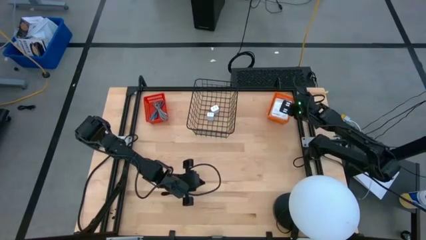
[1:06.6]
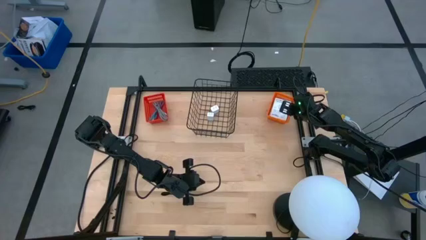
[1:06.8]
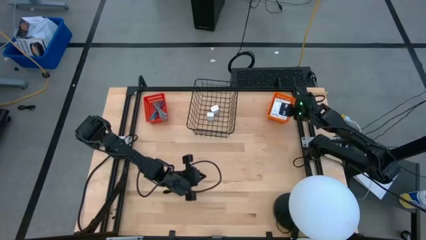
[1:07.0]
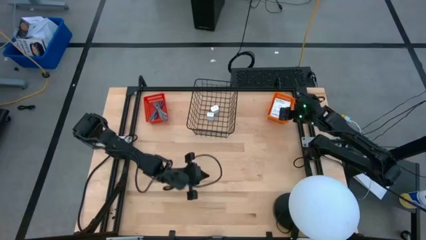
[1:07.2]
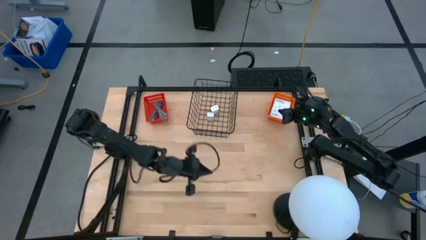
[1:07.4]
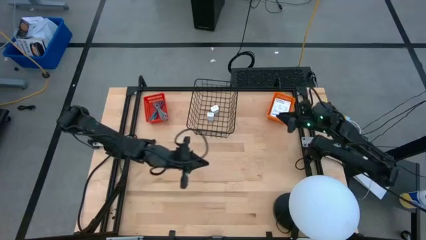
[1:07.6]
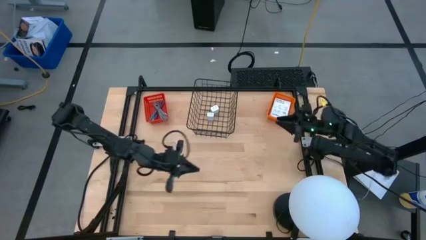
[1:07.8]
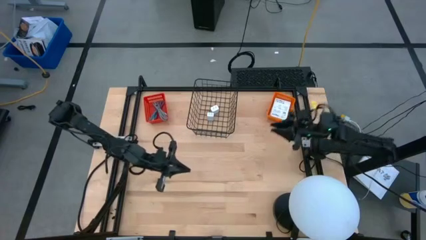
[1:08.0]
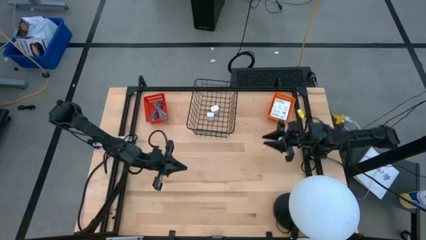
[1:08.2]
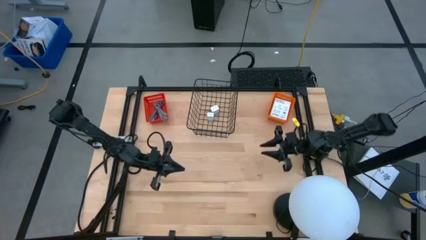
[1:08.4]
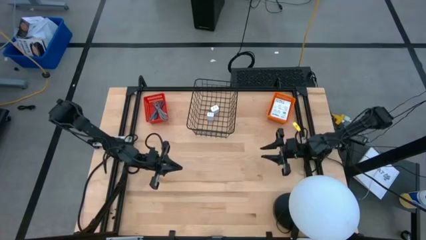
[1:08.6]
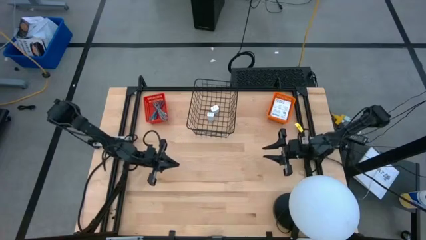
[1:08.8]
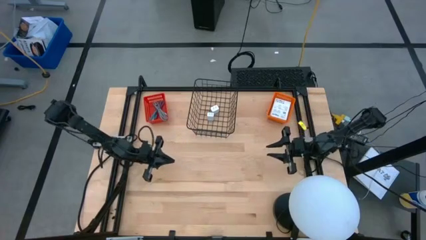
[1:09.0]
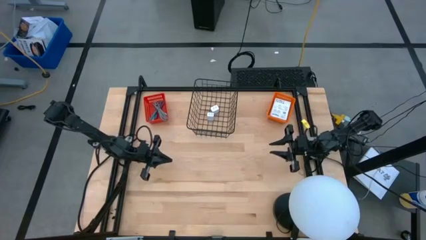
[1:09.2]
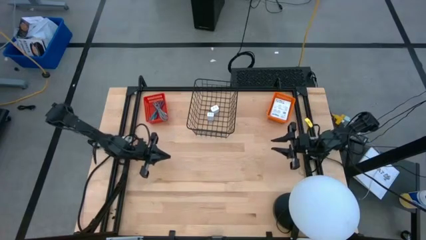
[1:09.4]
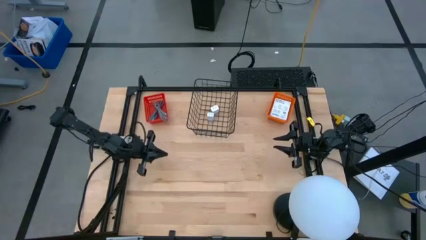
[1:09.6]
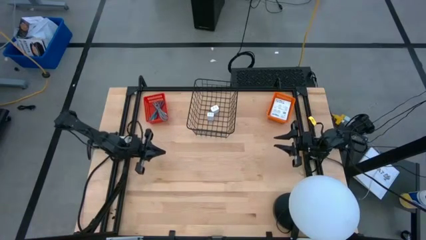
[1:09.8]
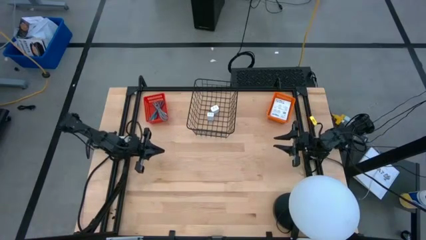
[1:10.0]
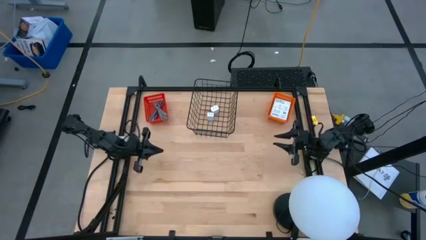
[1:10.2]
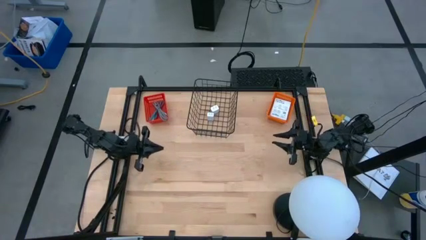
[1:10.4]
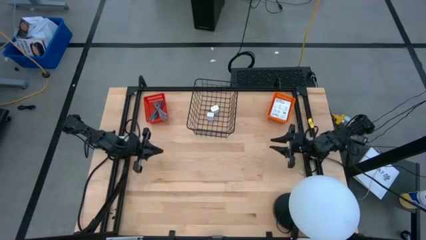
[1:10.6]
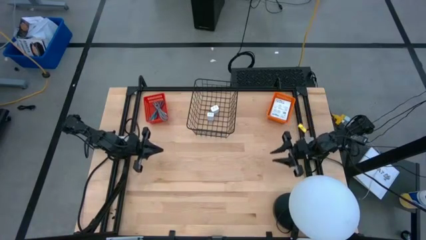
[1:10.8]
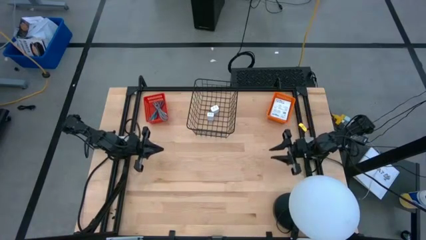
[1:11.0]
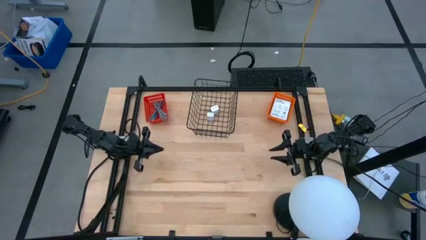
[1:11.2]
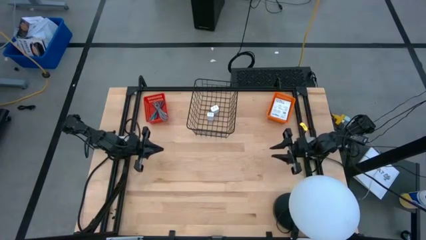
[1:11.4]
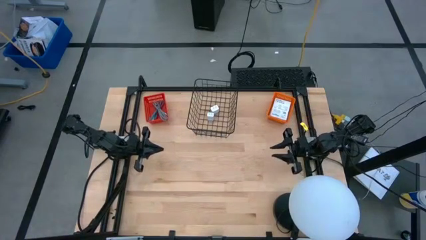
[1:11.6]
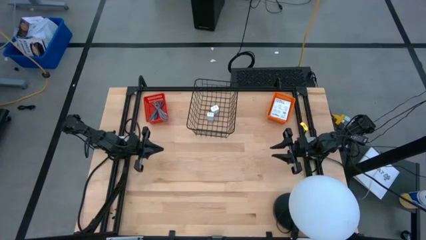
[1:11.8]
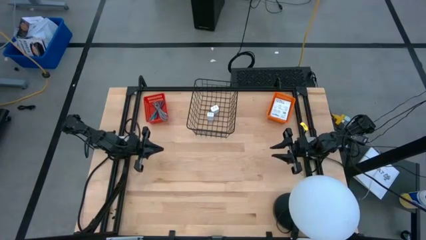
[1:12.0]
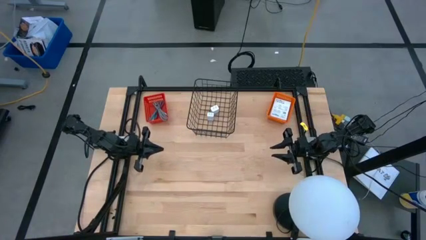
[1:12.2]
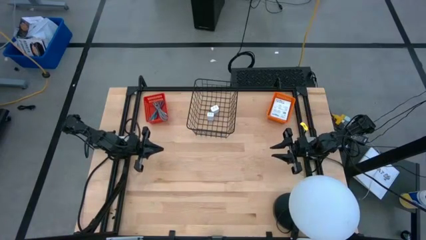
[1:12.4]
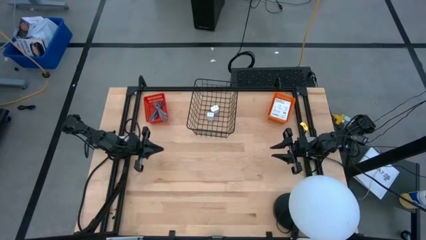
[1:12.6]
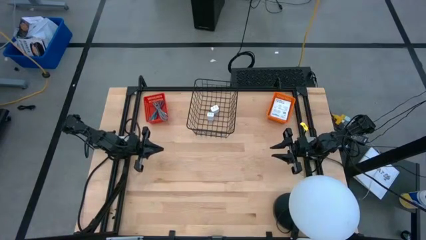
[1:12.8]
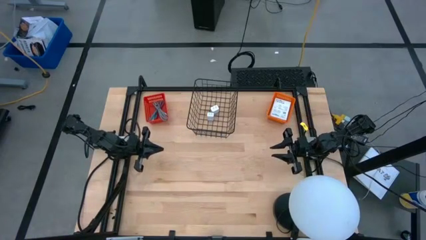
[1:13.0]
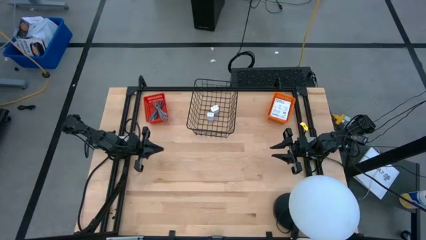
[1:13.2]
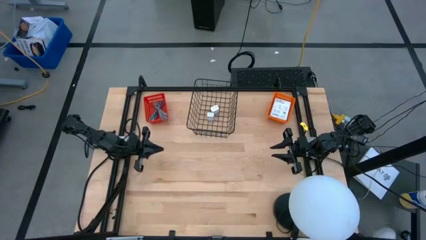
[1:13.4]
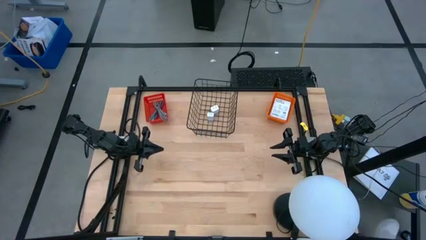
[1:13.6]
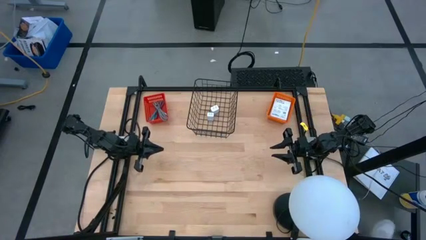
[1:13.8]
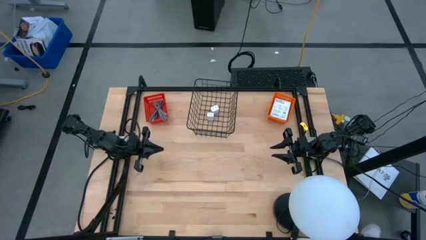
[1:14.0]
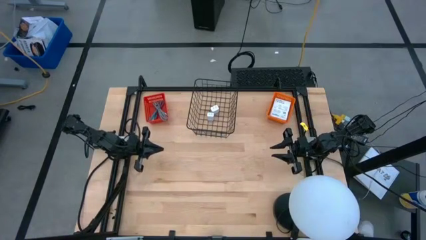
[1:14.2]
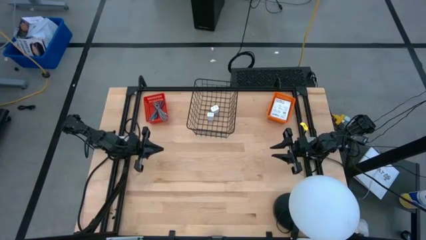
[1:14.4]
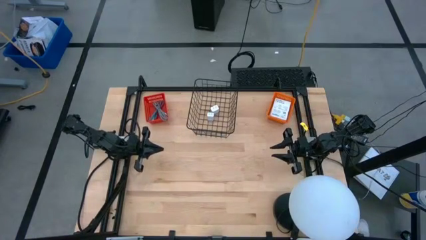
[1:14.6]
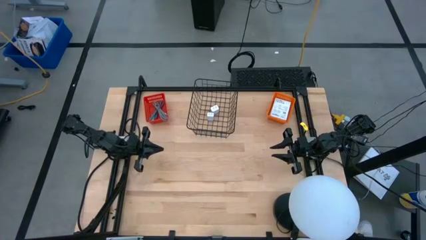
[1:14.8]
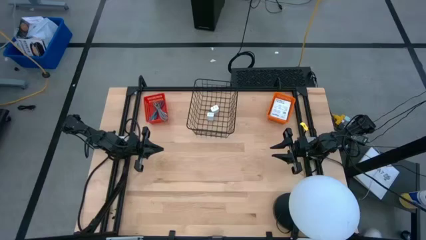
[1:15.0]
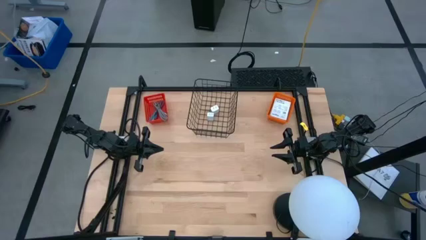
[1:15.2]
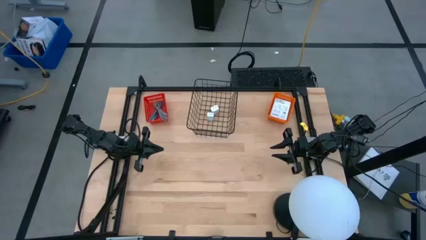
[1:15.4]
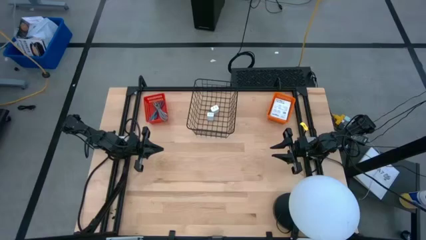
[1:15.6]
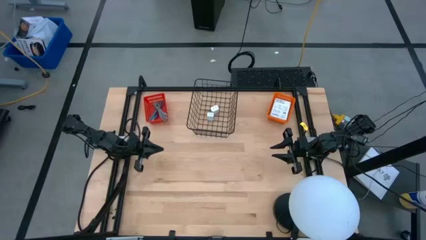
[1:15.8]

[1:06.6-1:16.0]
Task: Pick and place items into bin
Return to Home Position

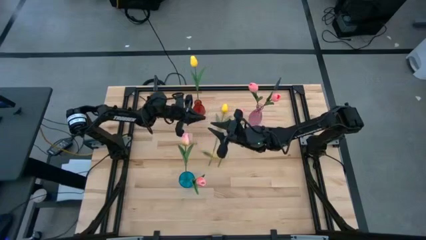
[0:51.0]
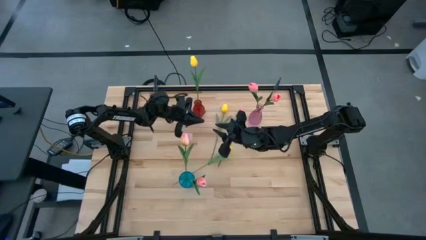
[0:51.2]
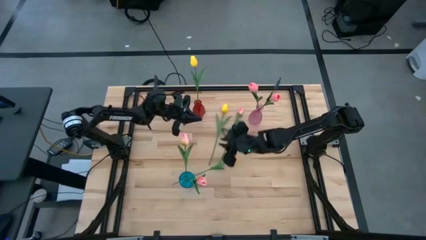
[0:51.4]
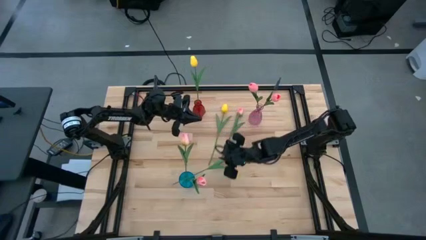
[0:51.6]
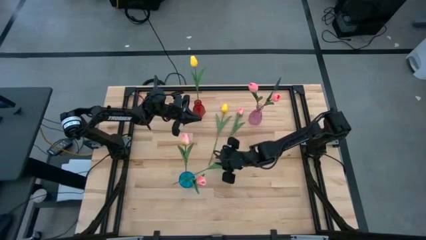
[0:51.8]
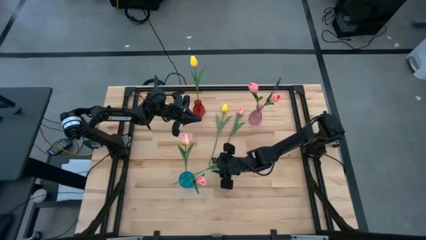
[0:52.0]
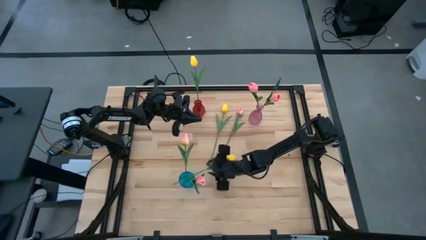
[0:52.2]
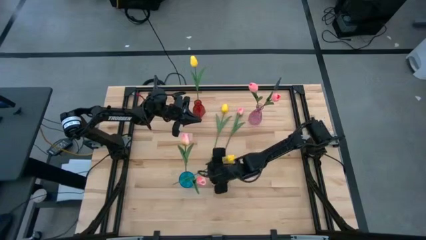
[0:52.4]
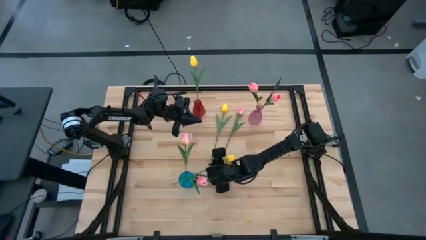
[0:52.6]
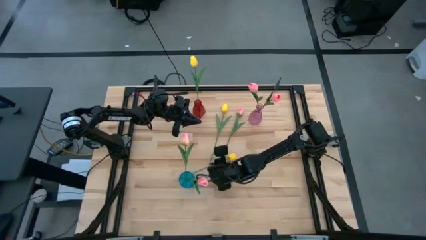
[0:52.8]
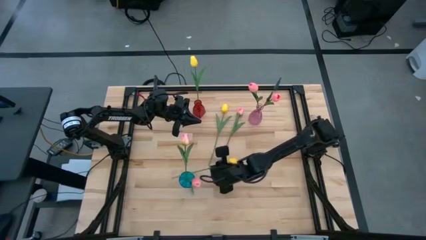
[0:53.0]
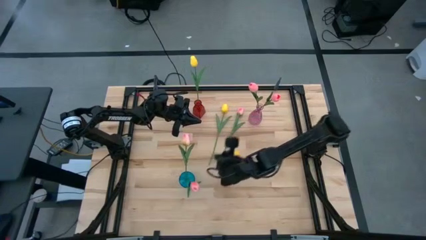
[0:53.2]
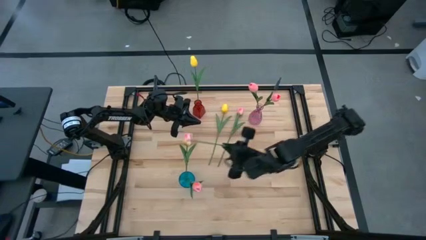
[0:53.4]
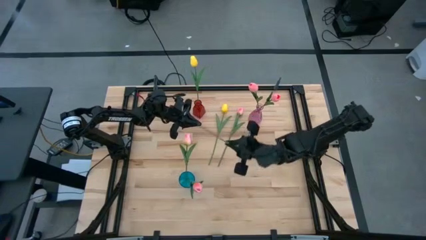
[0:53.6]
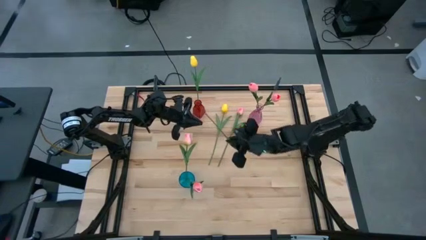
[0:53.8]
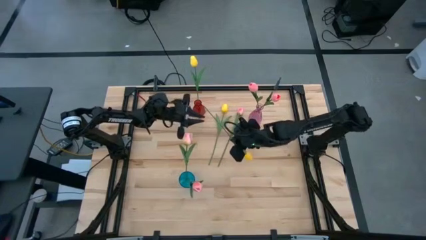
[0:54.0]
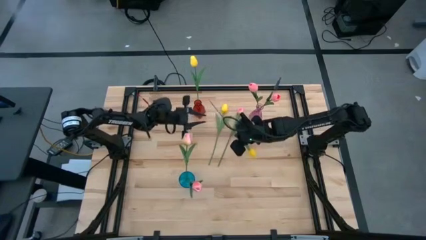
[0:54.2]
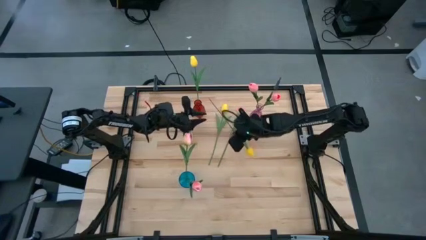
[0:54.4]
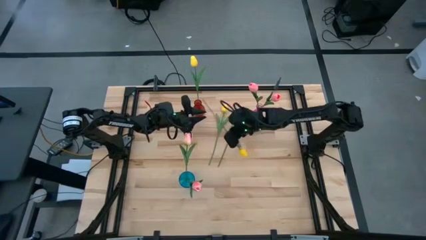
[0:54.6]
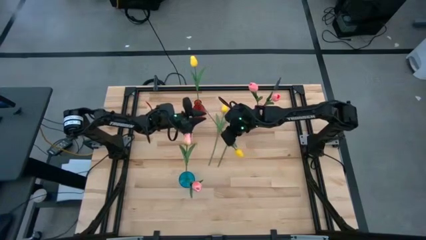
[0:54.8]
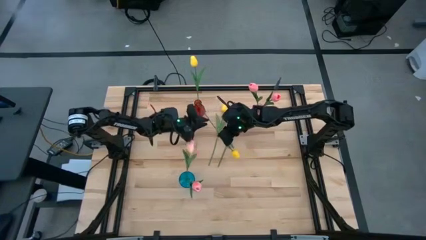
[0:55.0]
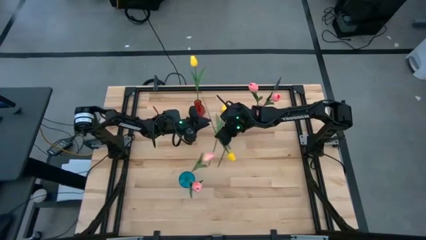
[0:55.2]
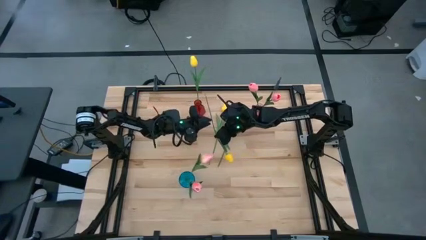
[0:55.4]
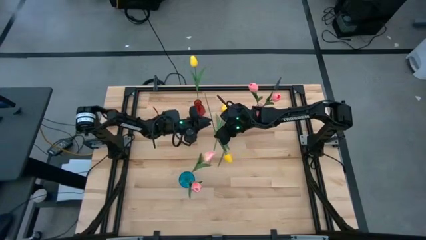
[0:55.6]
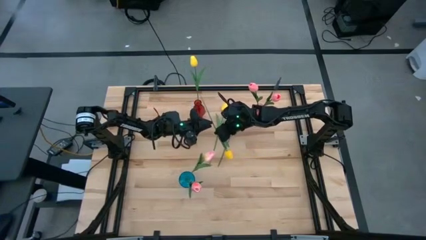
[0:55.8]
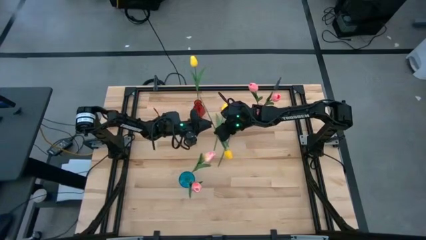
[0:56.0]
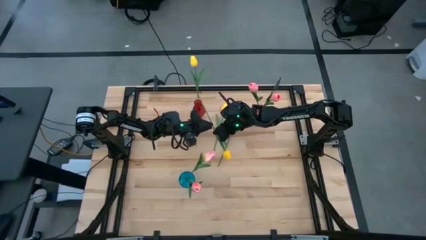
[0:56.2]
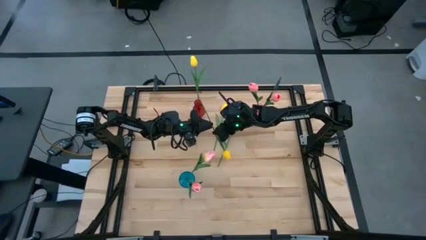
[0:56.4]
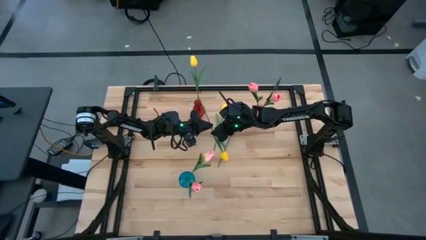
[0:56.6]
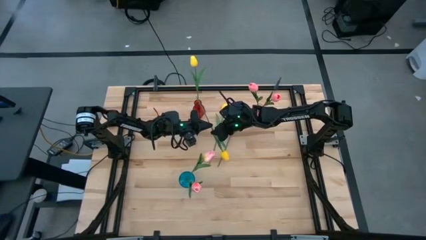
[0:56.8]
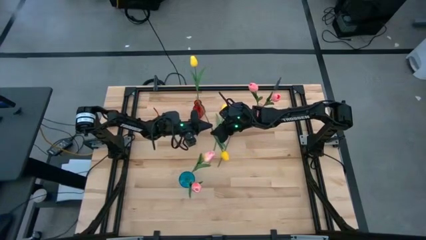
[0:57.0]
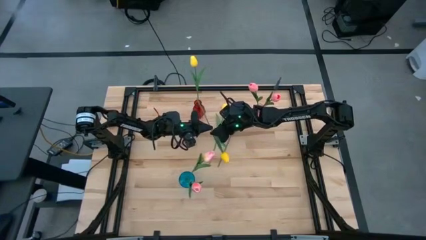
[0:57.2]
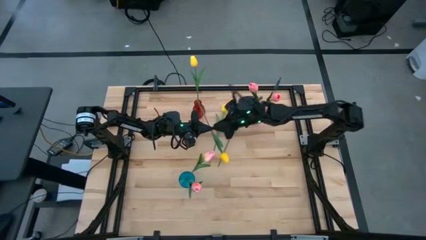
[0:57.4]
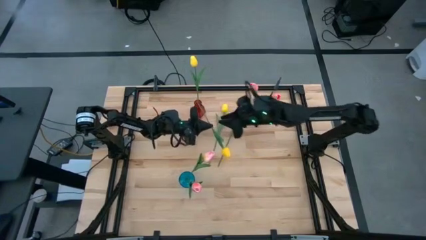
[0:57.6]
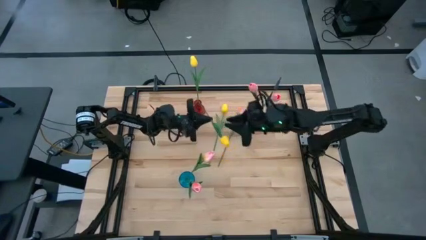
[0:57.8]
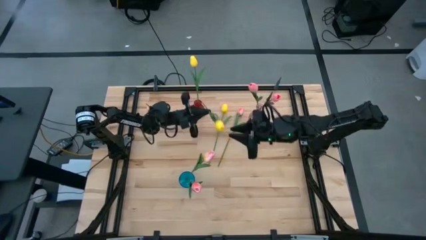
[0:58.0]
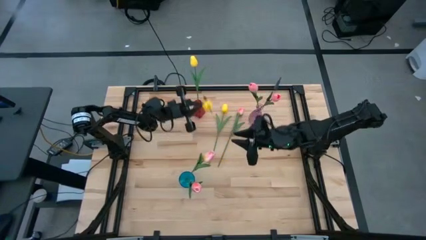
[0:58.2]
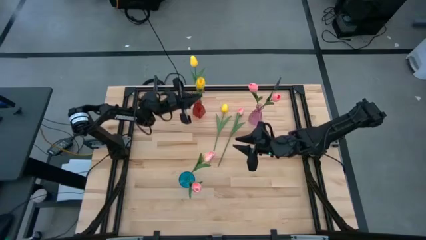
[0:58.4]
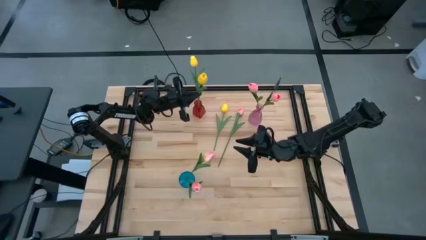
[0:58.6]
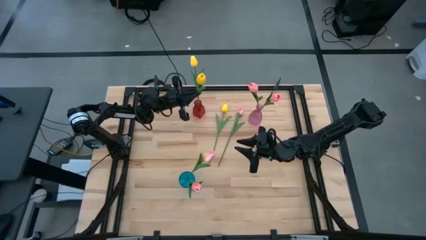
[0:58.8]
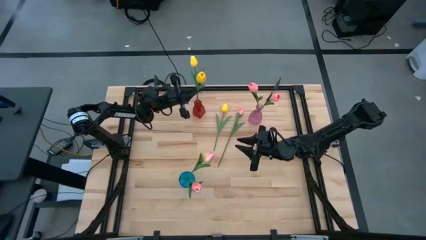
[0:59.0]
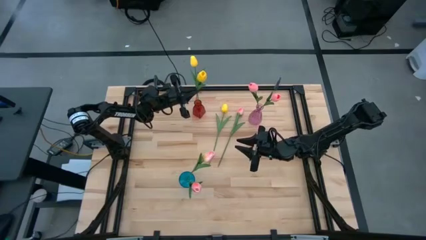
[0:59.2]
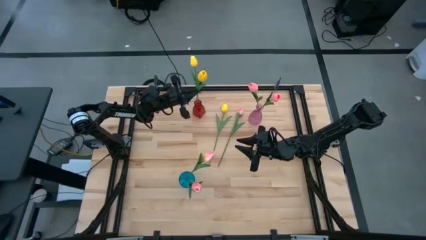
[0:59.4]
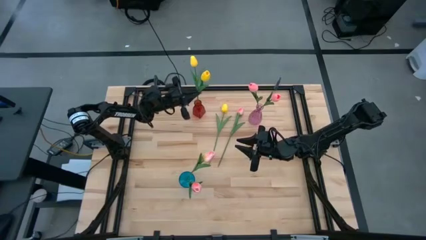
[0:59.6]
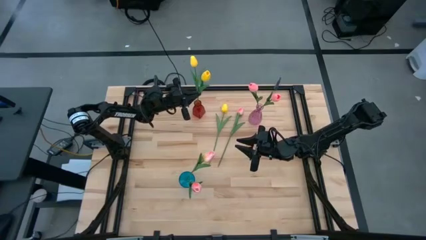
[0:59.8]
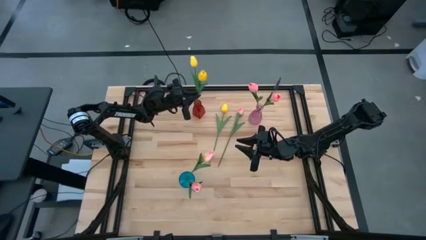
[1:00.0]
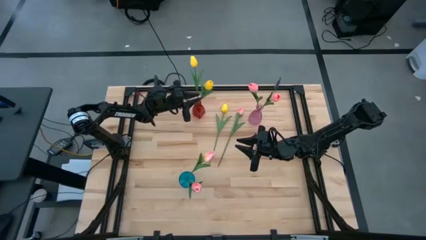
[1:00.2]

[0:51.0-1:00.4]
Task: Sort flowers into vase by color
Put the bottom yellow tulip into the red flower vase
